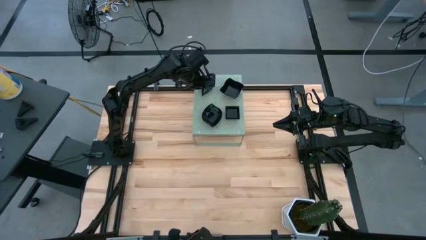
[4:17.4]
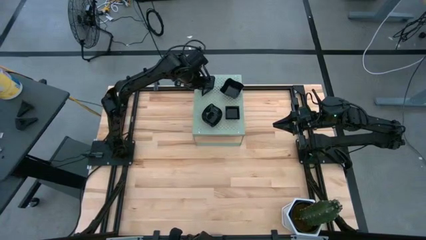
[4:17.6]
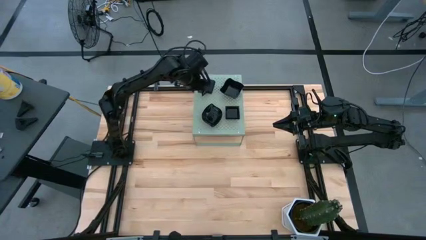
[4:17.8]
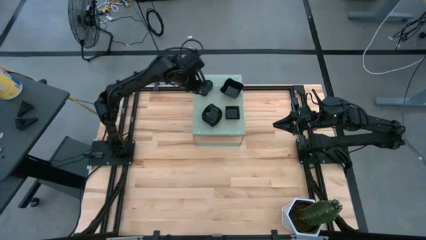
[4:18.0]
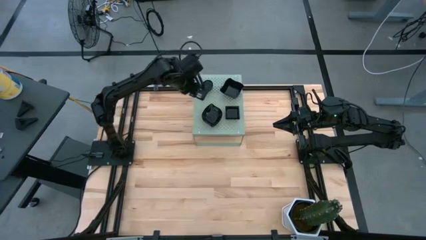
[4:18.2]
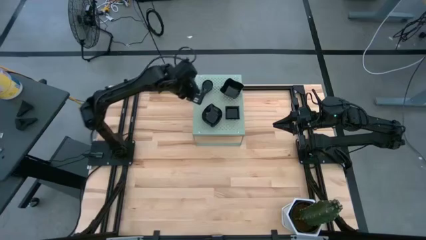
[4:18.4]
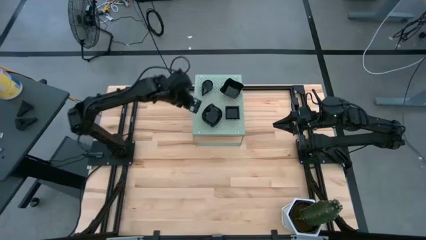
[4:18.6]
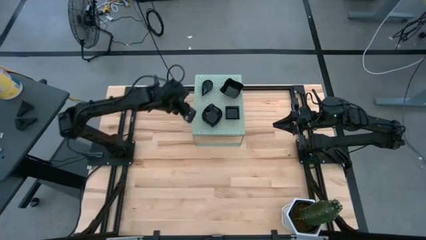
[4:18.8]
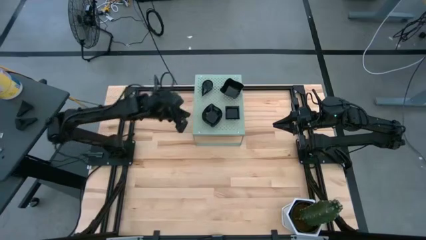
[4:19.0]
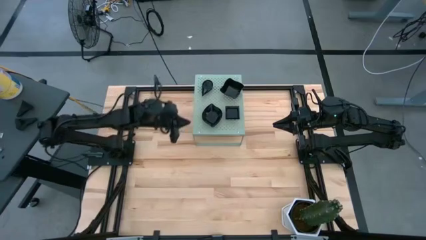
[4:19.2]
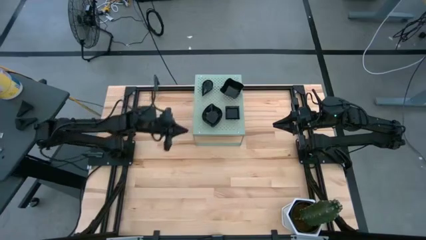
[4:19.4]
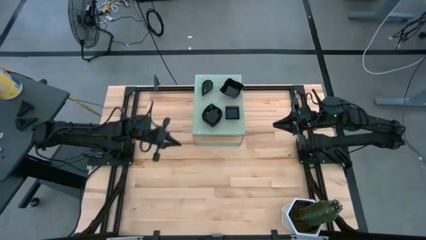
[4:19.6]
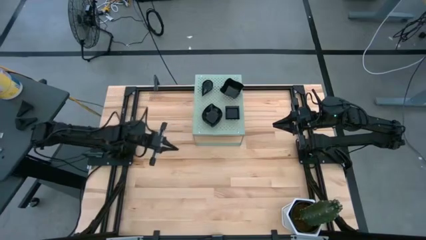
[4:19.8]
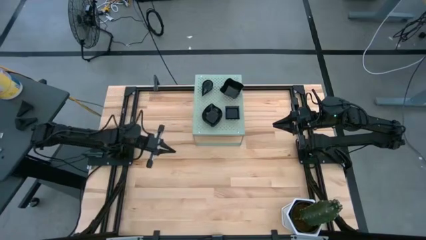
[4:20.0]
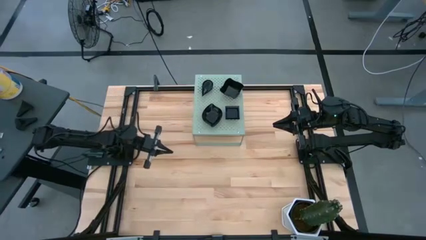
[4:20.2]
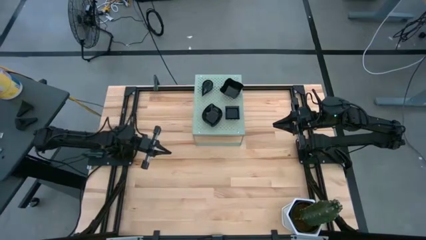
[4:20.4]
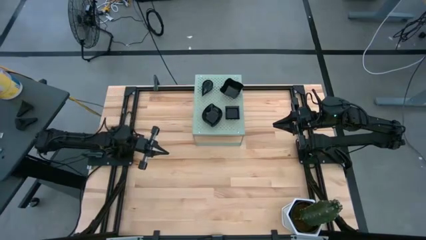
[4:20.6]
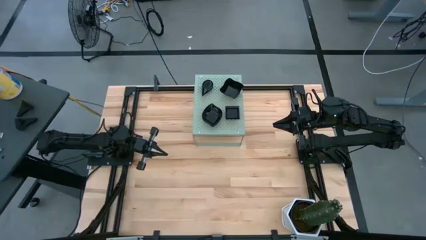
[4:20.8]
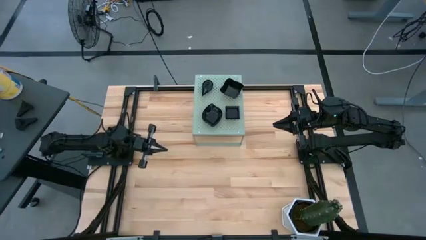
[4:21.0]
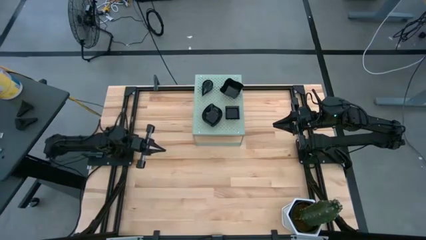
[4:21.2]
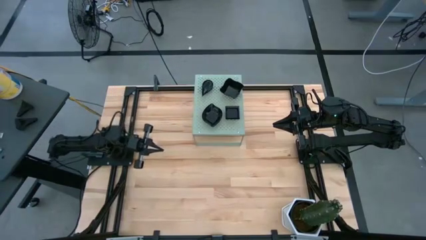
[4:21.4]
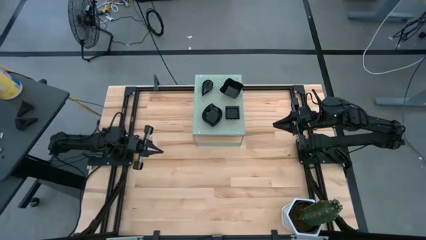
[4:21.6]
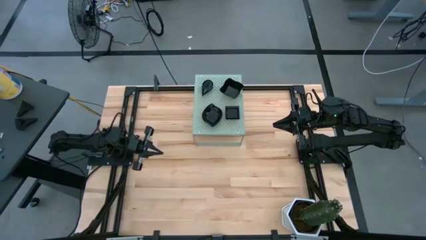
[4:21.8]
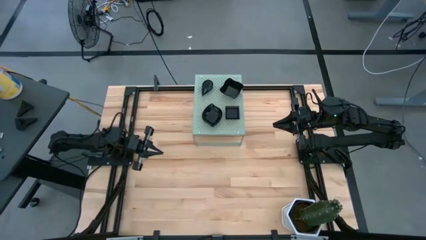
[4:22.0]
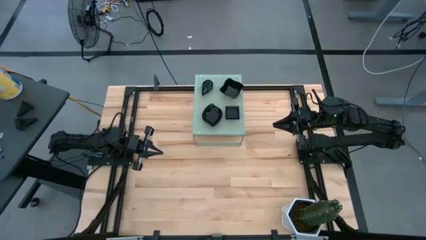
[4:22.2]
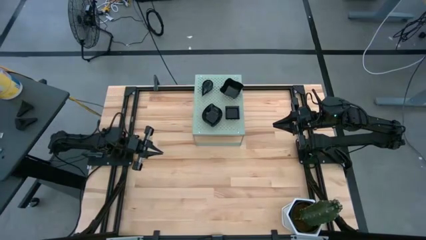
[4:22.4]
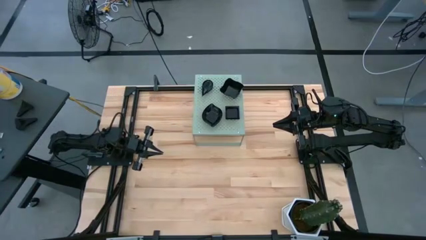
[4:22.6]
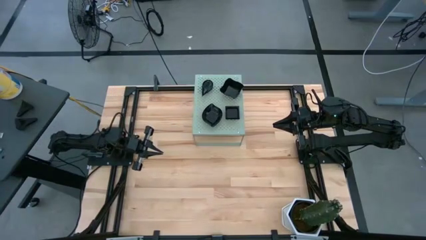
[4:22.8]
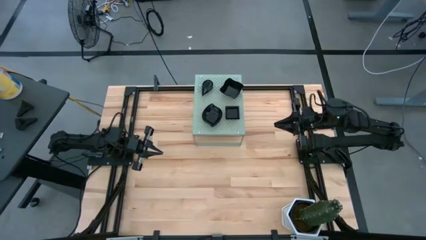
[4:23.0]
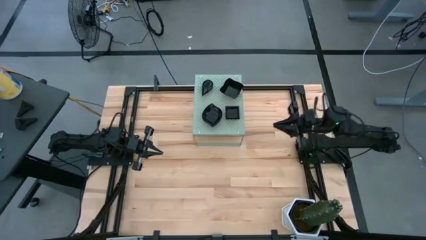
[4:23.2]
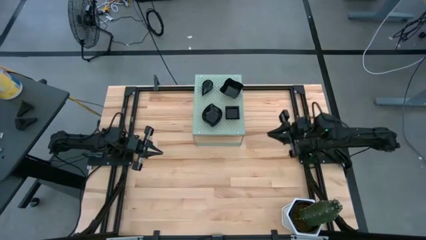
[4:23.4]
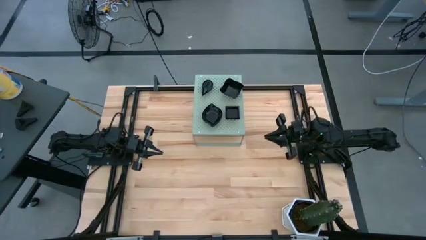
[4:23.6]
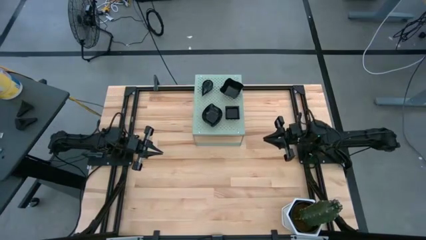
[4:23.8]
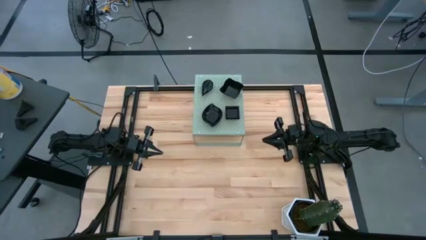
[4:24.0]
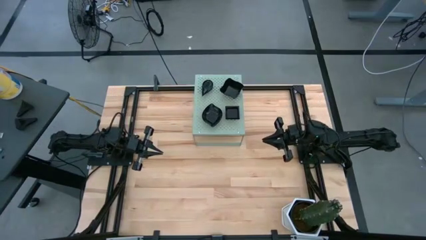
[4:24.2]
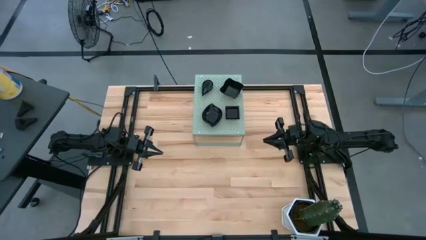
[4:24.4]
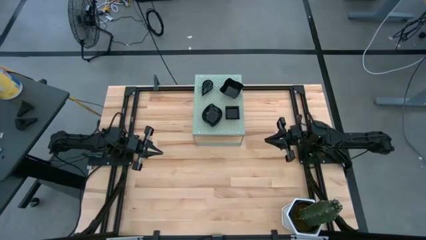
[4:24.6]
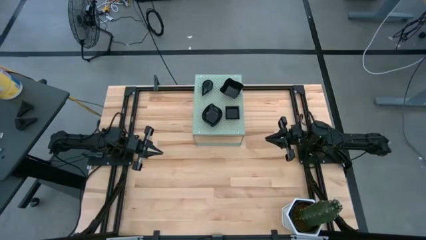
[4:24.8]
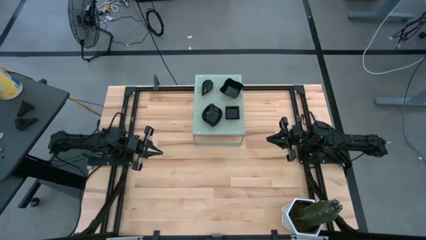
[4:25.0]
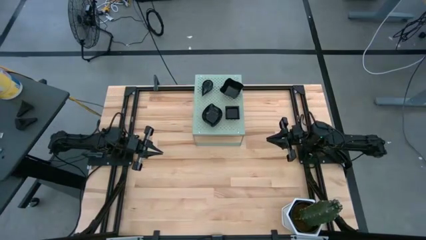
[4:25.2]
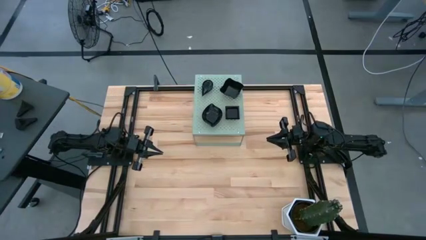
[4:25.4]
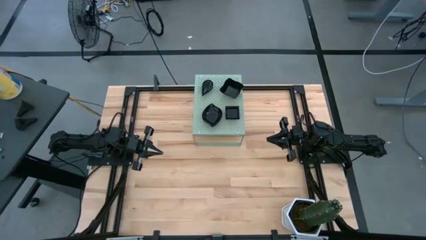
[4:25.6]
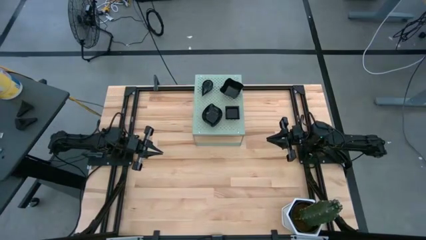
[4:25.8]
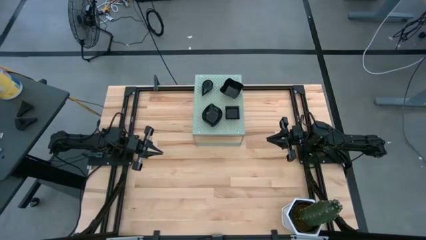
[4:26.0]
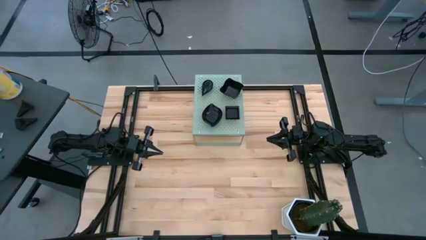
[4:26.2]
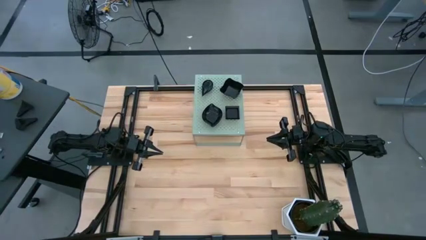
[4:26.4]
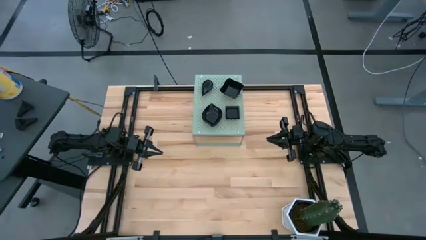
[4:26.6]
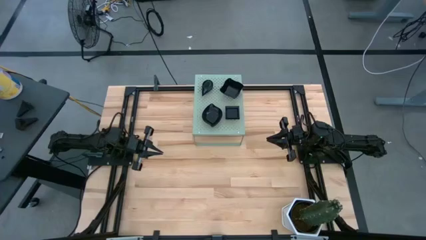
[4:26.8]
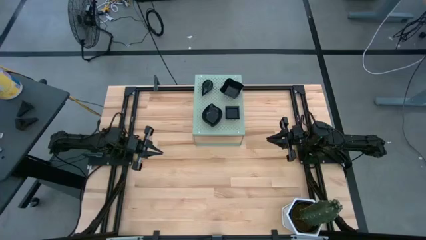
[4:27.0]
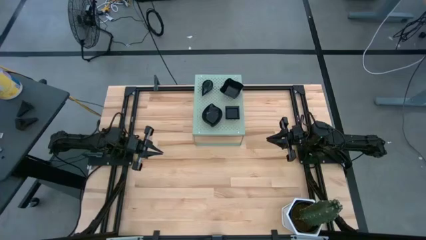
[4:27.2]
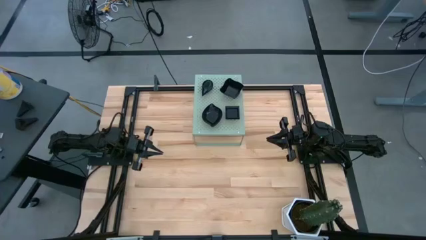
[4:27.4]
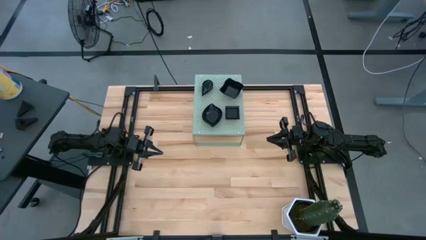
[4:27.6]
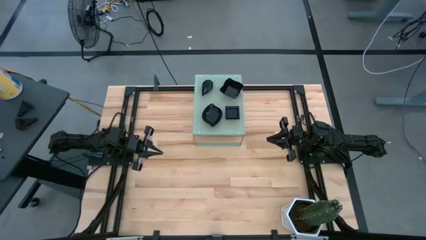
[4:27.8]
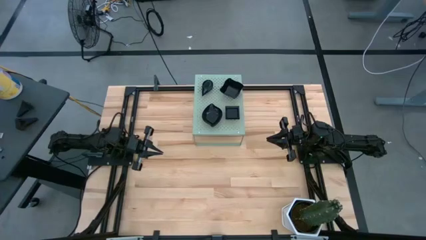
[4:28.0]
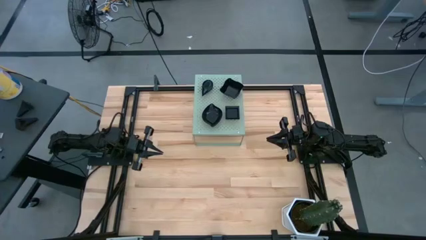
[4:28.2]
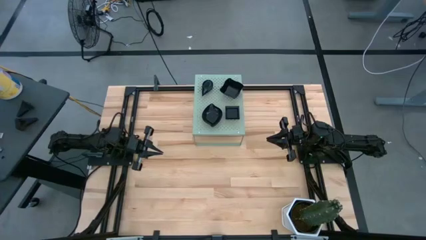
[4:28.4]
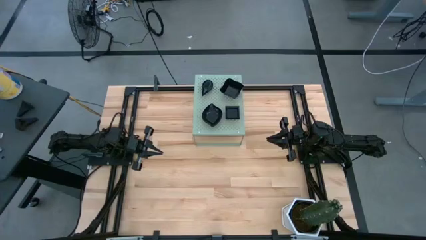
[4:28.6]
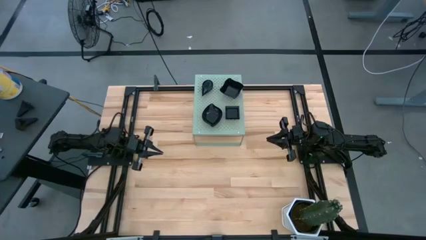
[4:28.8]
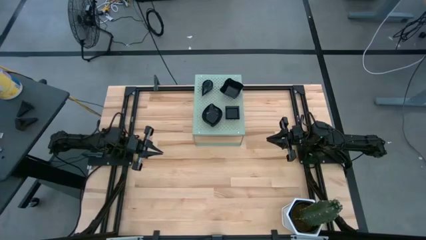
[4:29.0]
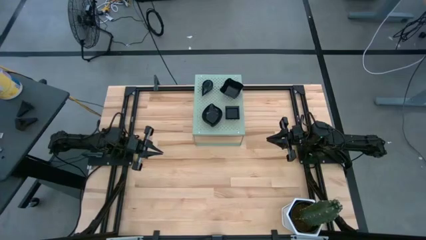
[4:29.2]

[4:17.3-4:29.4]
Task: Pick & Place Mini shaped plates
Return to Home Position

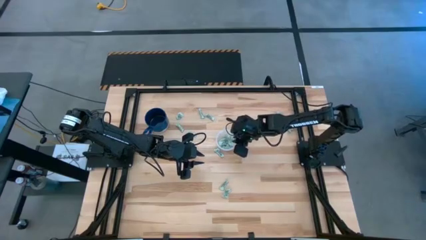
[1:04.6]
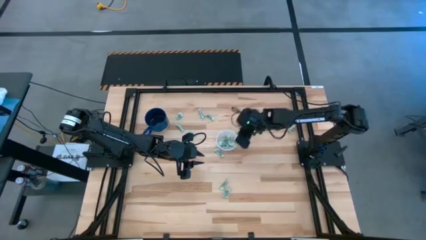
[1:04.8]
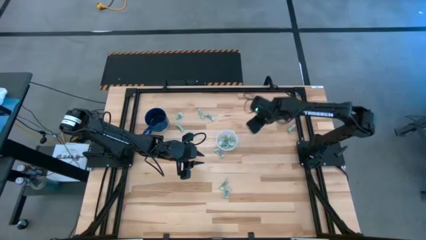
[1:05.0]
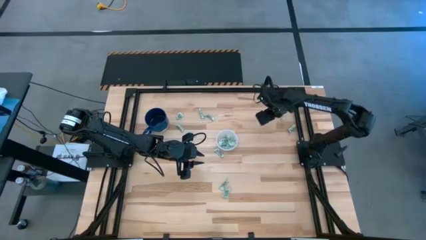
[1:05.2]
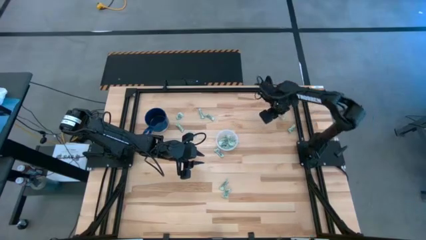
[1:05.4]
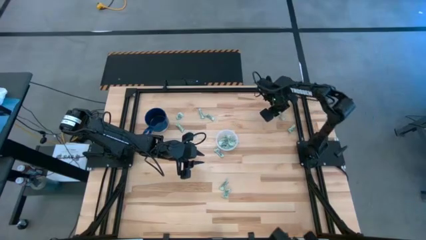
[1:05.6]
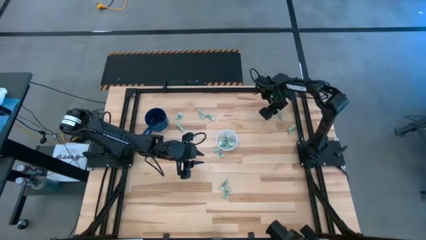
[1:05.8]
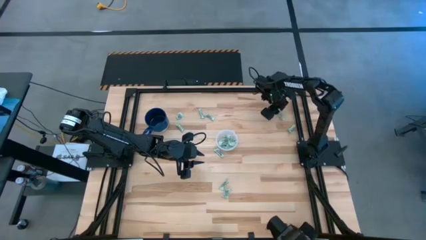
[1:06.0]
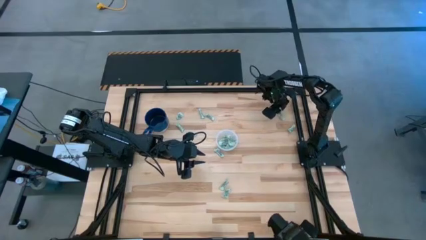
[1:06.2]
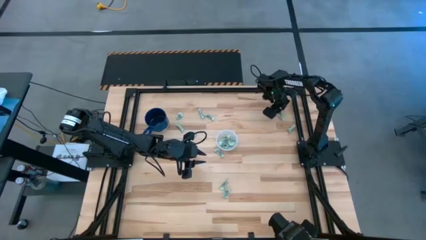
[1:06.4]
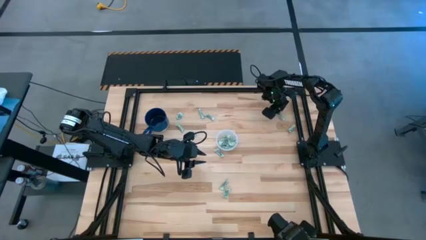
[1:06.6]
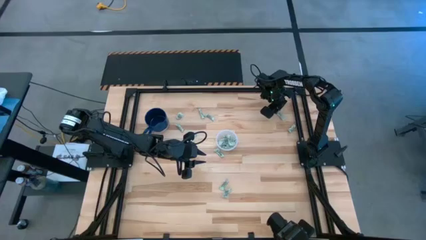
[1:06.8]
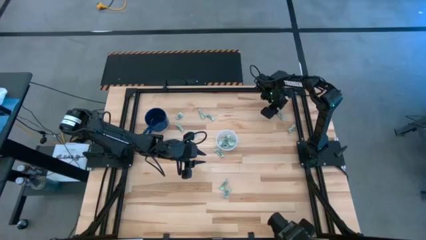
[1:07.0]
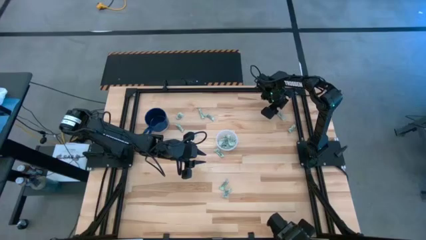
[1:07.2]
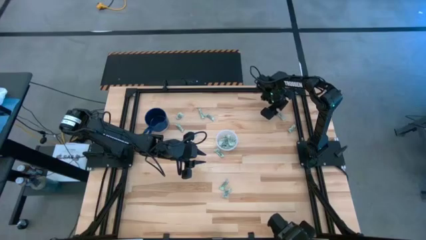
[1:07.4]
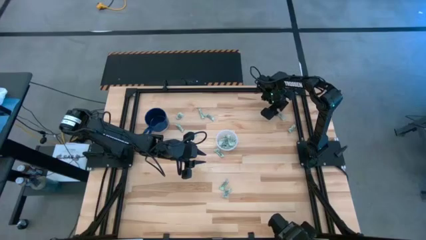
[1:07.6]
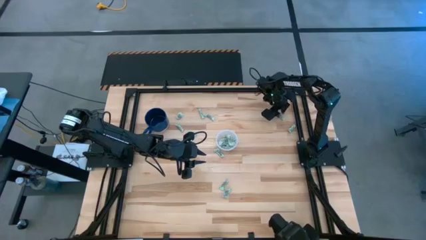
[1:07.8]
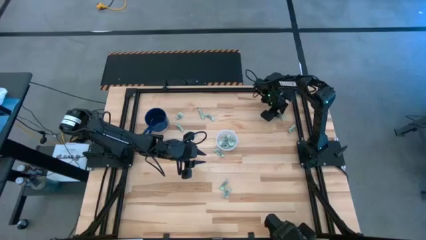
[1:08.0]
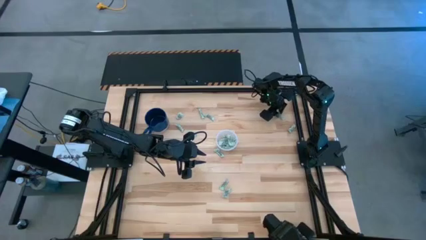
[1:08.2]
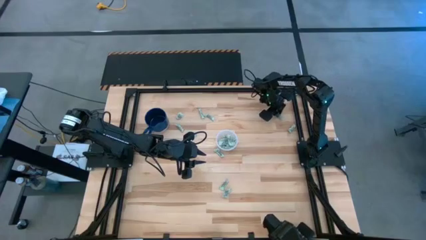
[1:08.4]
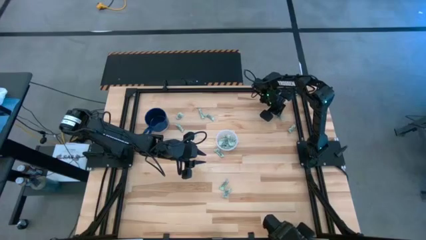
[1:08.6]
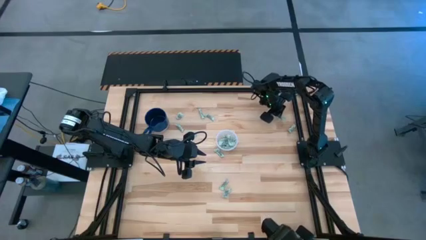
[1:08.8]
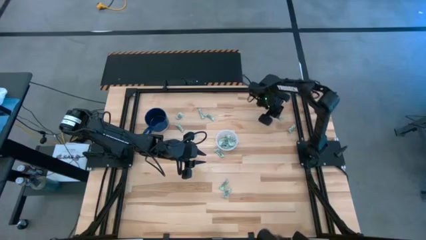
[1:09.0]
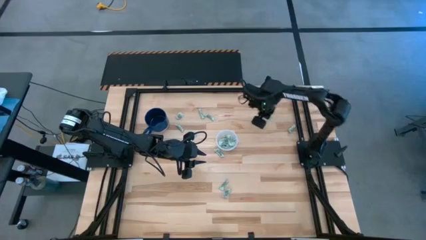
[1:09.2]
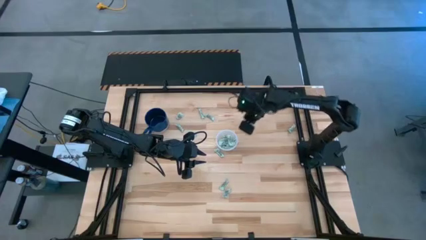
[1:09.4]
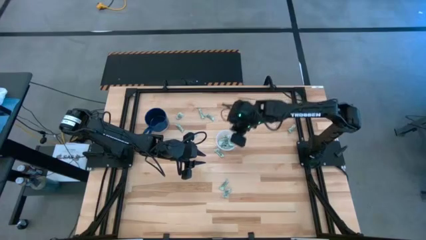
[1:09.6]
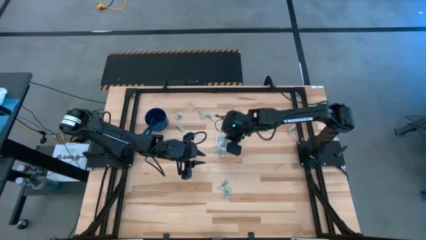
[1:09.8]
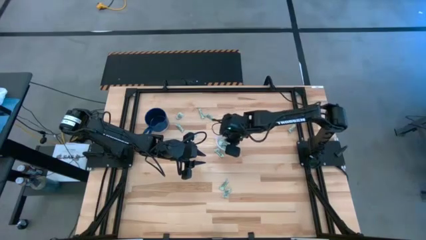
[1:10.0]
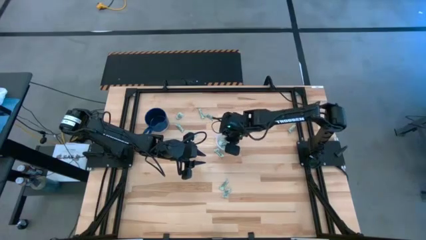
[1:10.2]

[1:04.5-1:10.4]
Task: Pick and place items into bin
Put the gray stevia packet into the transparent bin
